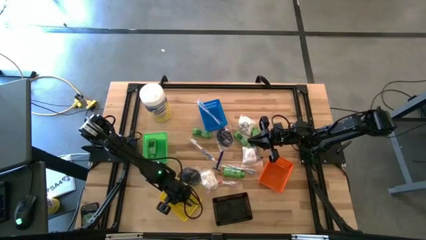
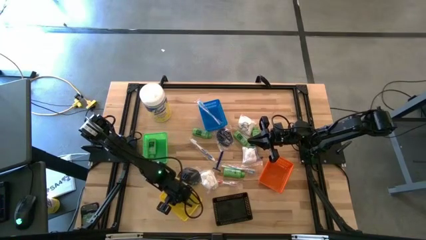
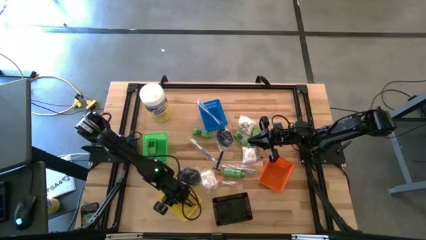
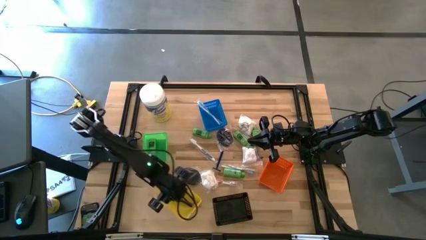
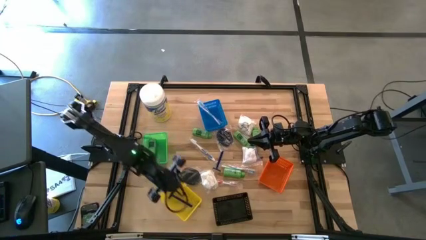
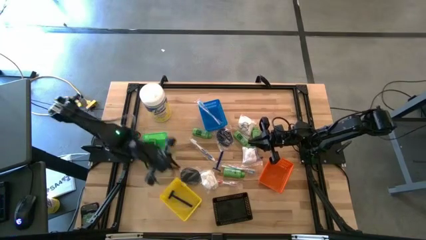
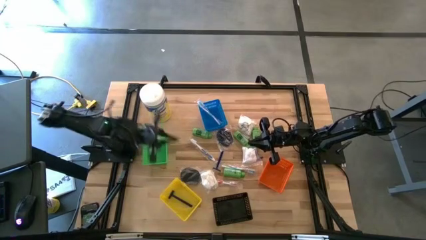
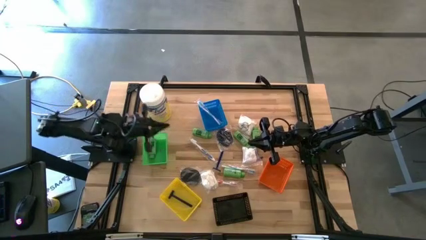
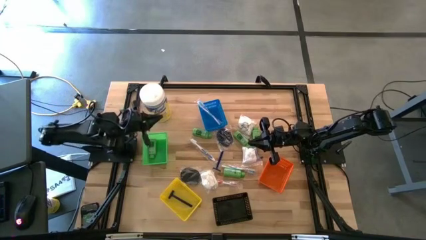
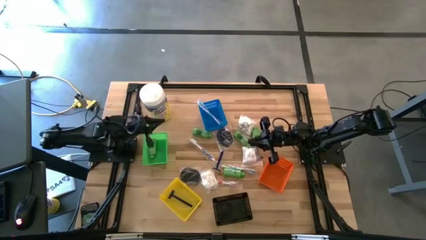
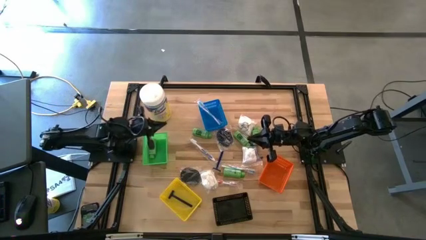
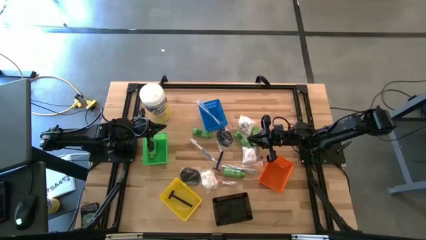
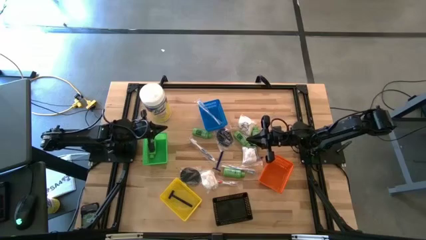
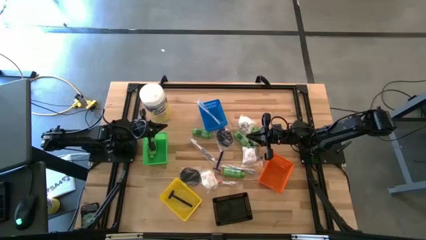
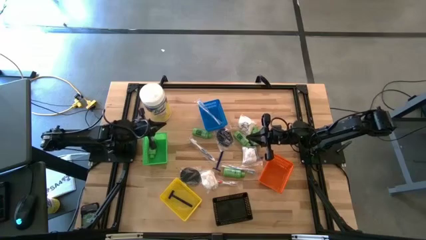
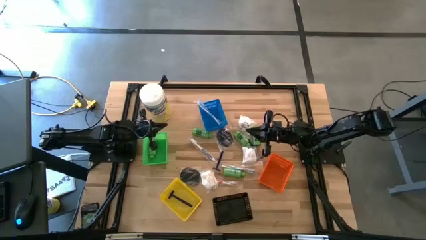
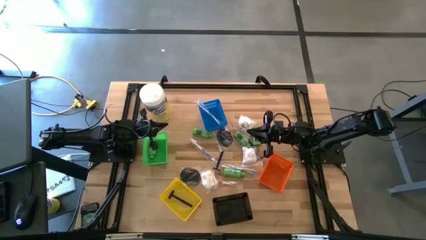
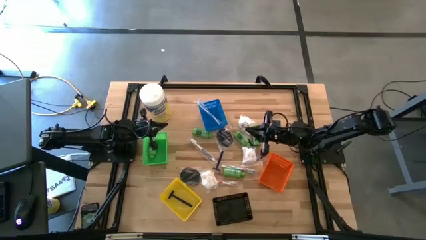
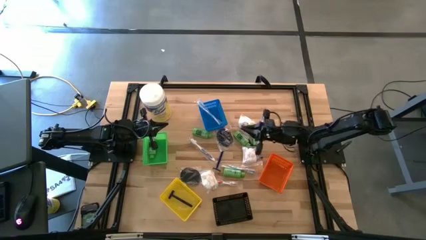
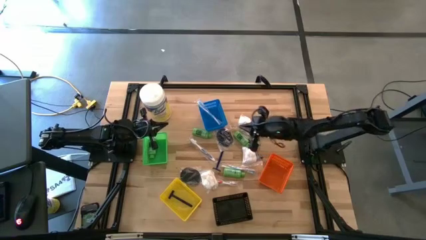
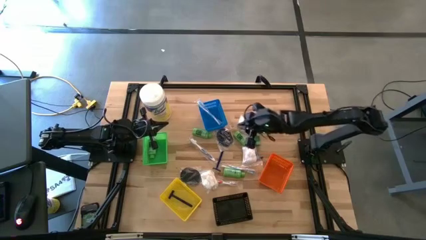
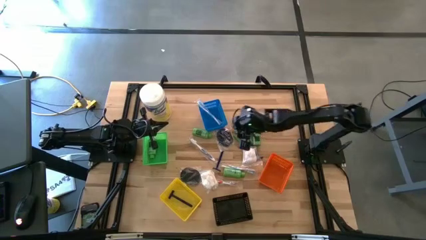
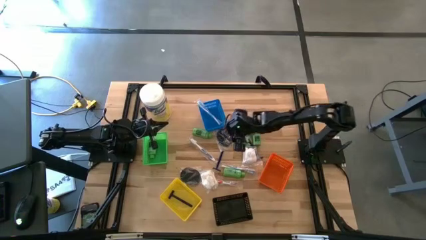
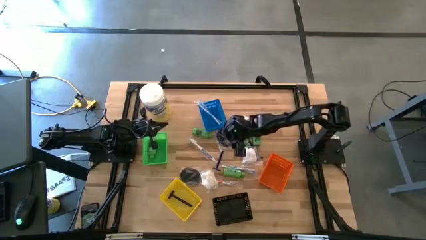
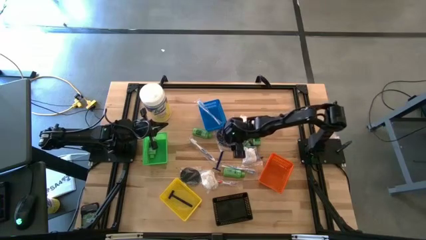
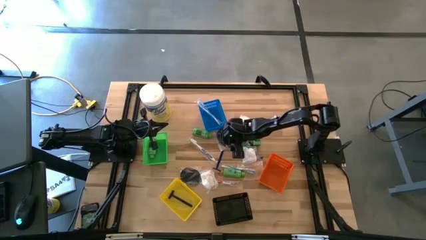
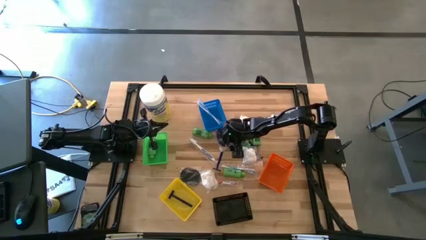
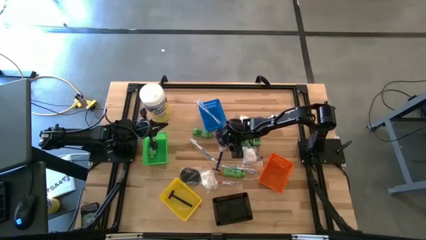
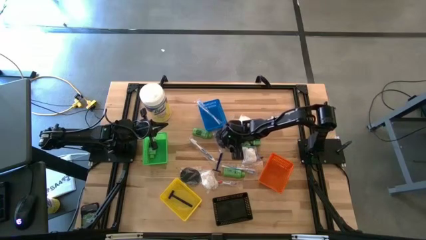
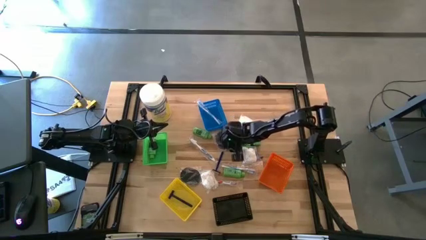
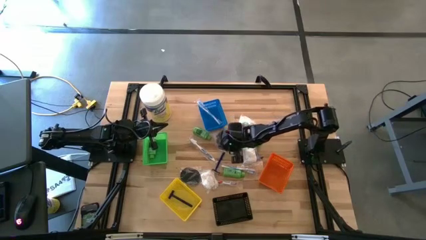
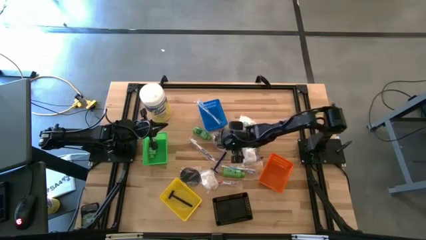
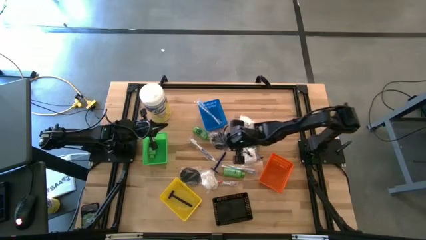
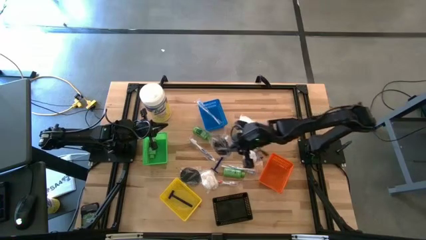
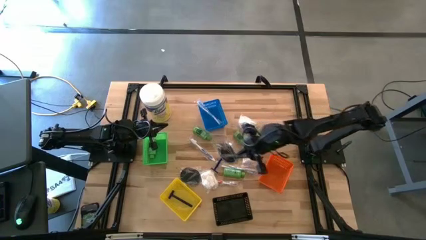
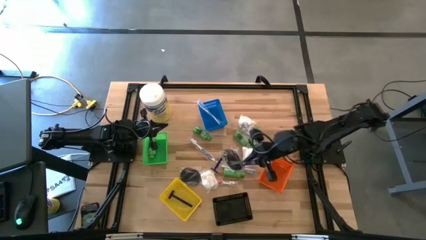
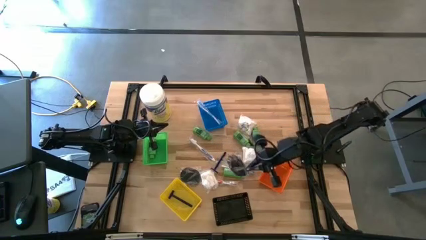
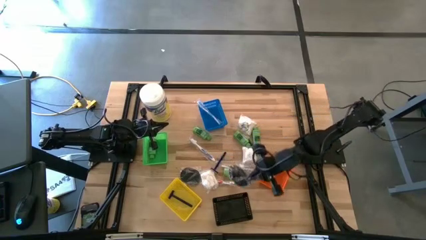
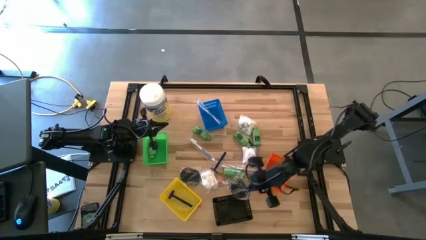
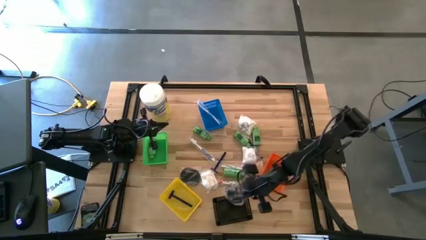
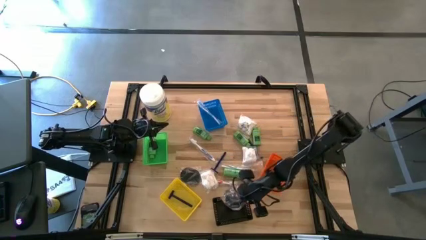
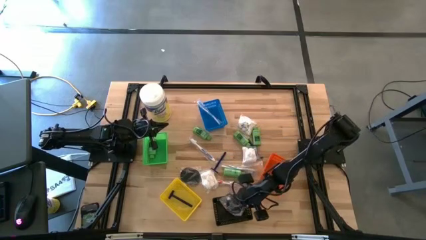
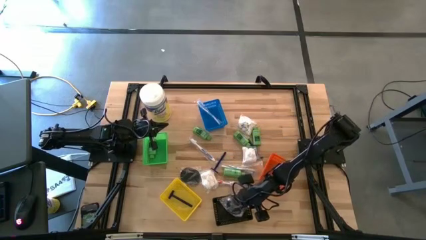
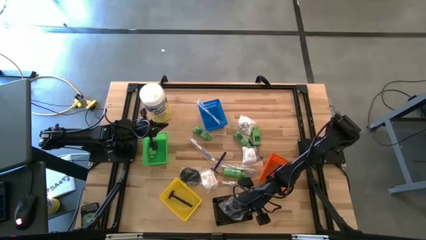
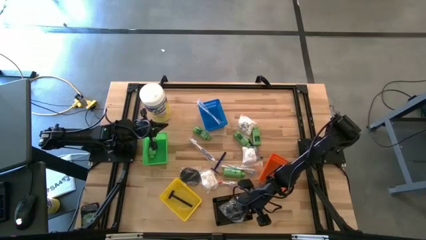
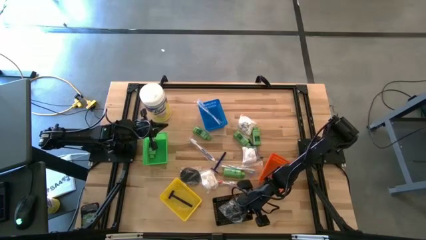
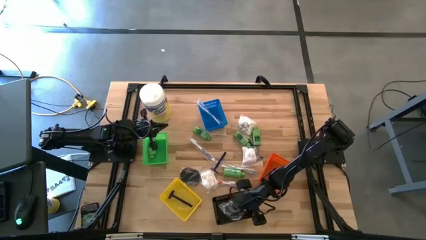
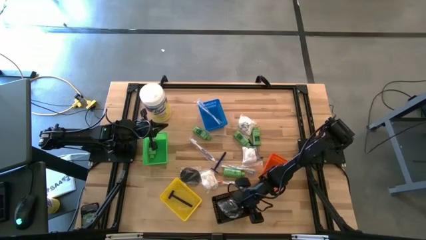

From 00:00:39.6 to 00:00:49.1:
Task: Pick & Place Travel size toiletries
Put the black hairbrush into the black bin

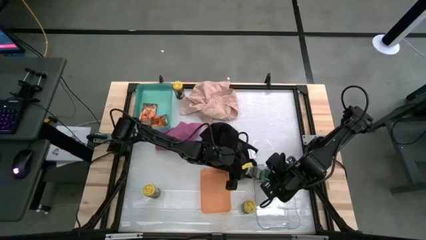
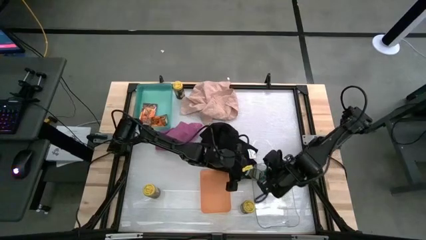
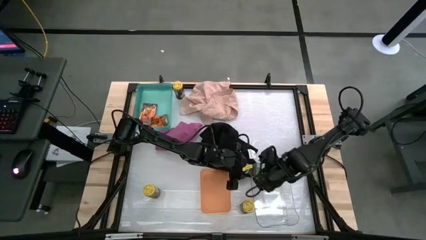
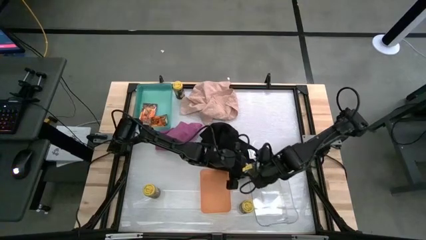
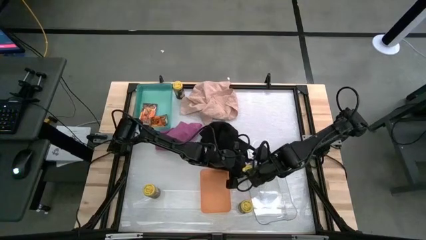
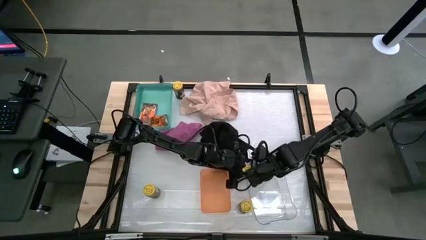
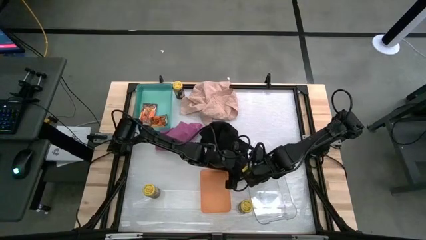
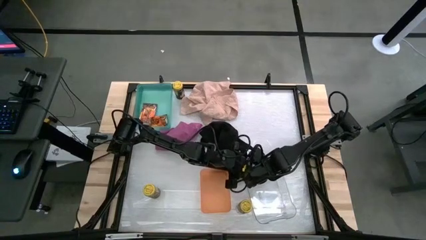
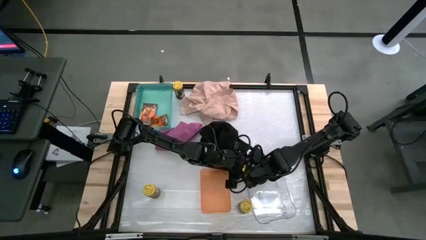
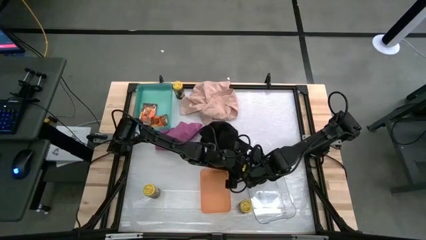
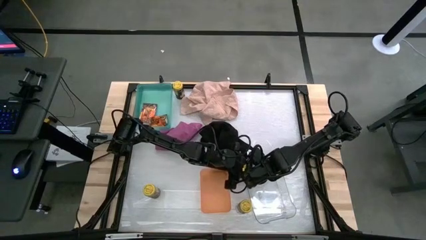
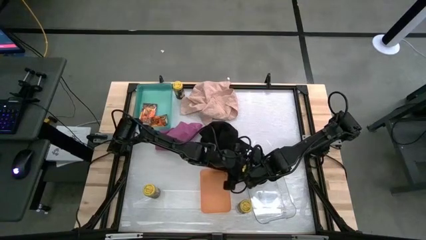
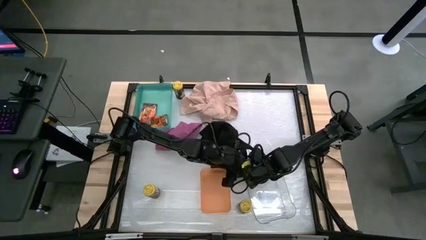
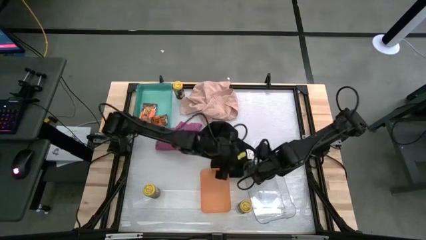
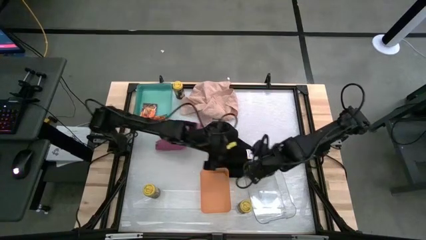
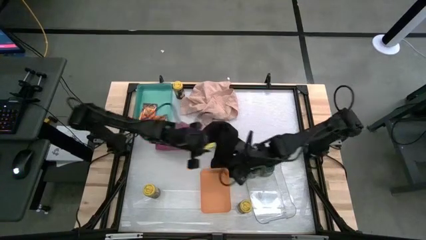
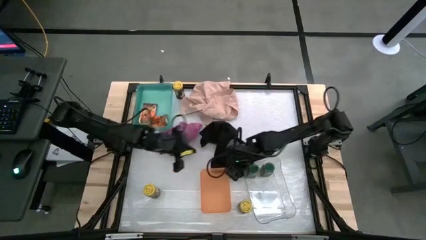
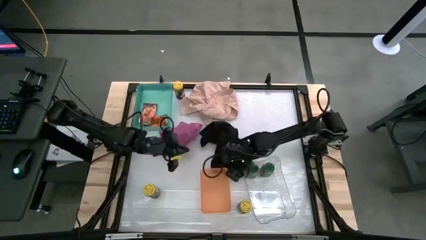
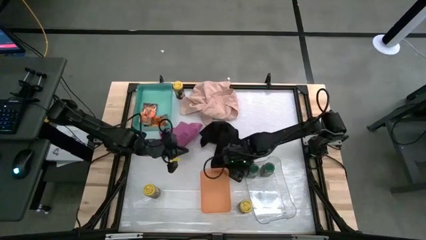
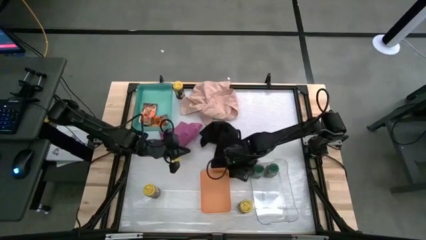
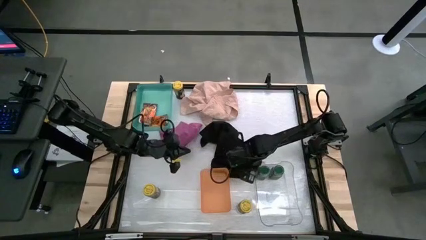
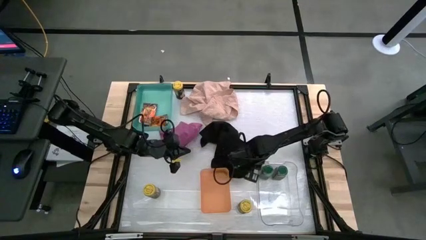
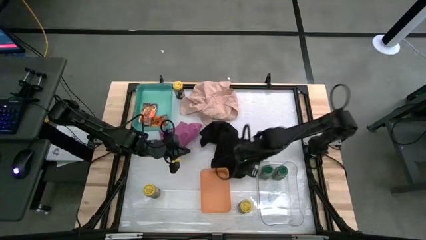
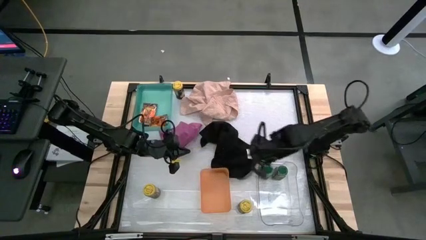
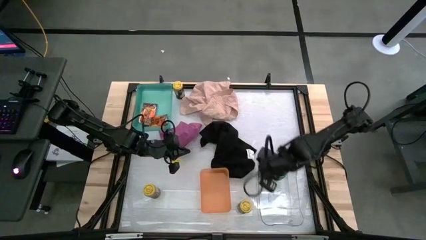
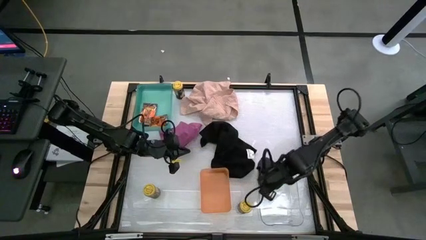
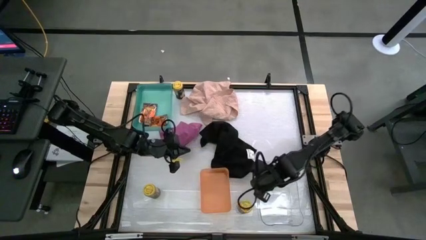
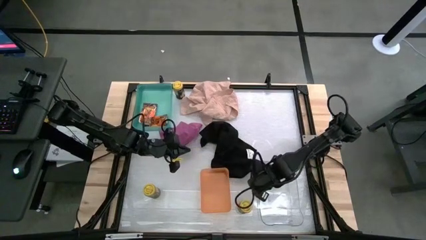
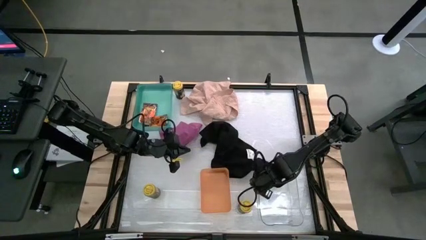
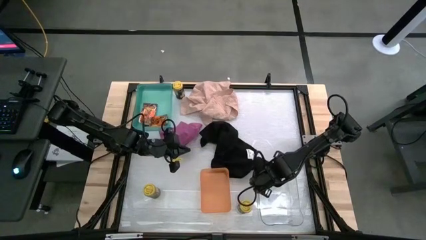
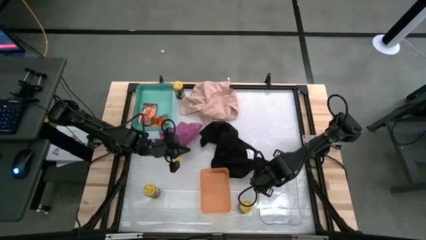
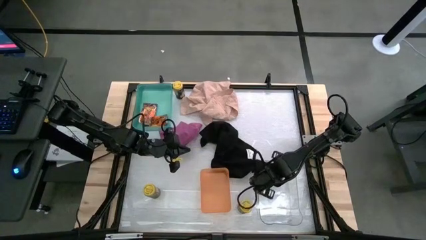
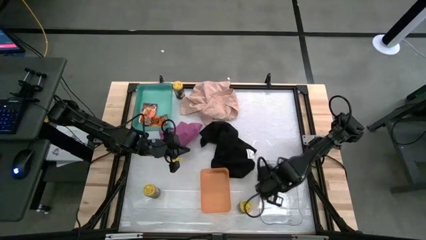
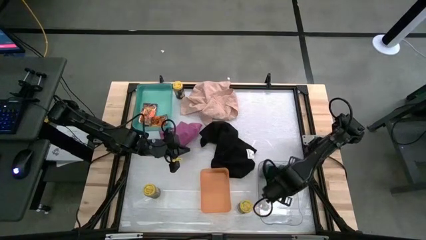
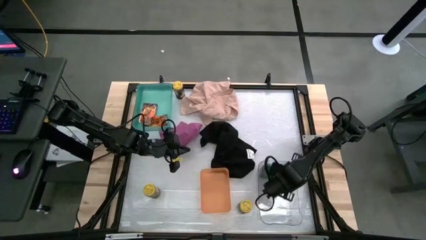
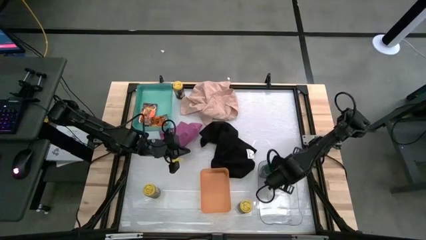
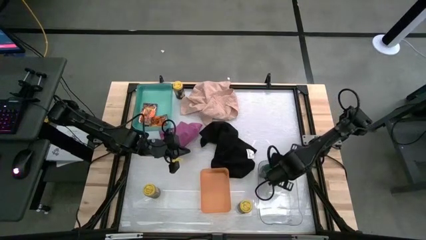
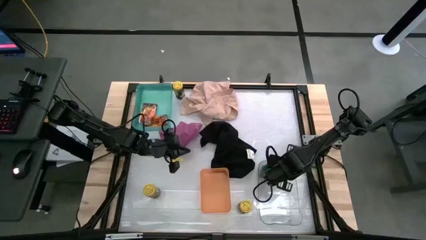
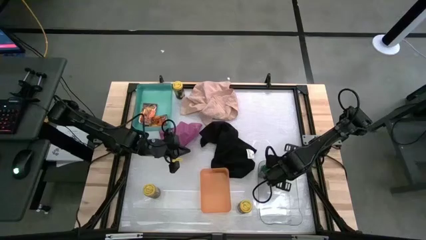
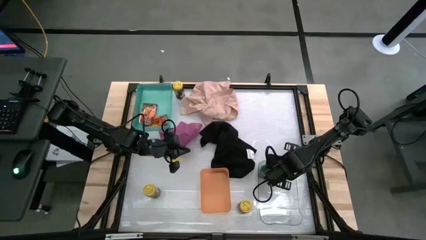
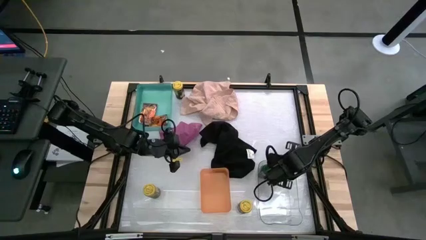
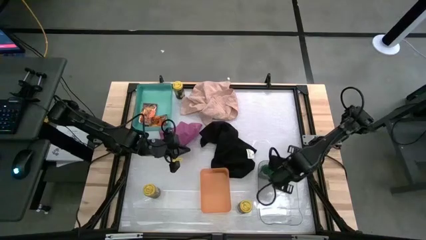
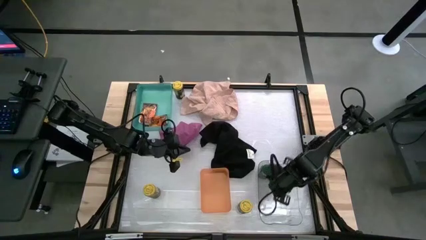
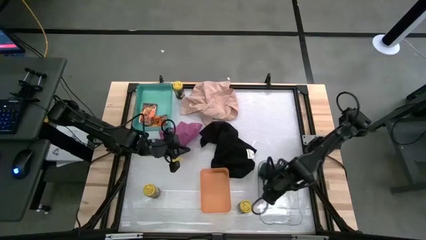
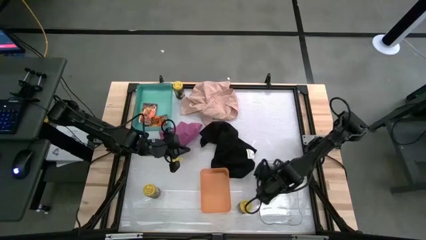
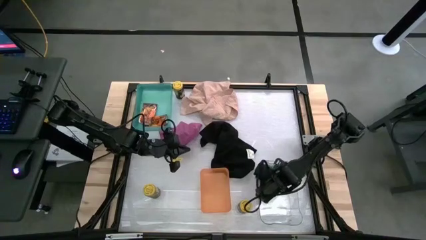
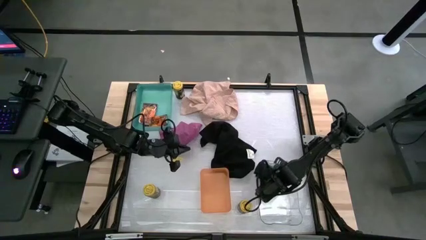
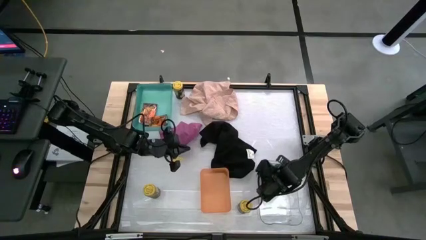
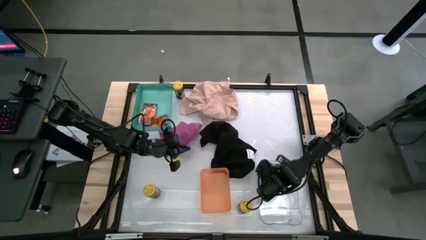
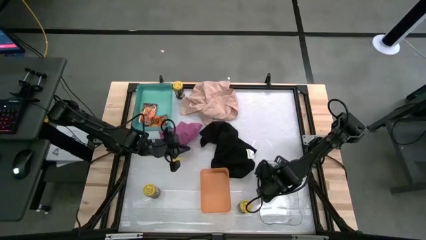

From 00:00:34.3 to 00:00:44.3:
Task: Sort spices by type
Put the green seasoning bottle into the transparent bin
